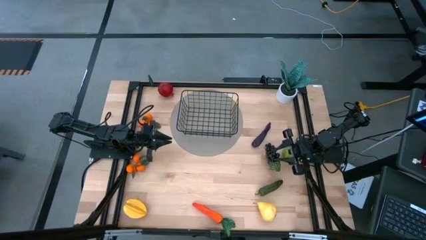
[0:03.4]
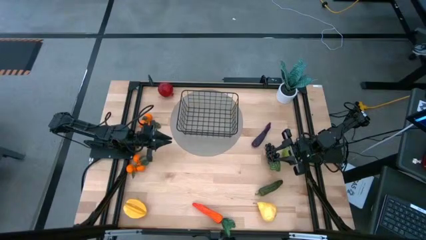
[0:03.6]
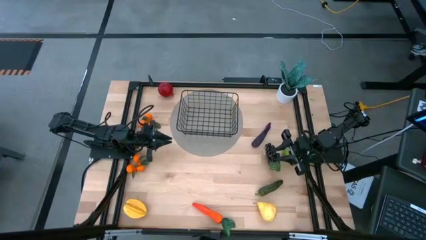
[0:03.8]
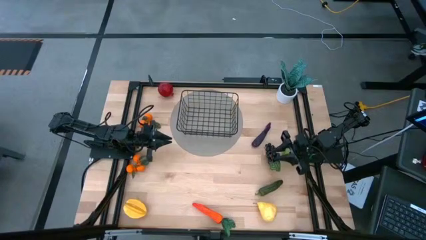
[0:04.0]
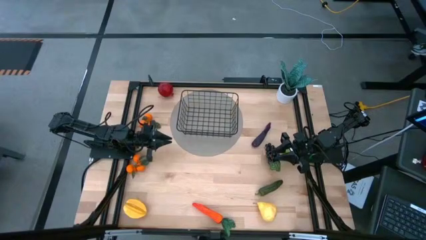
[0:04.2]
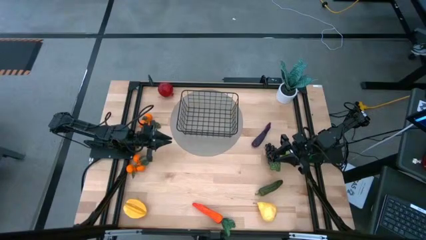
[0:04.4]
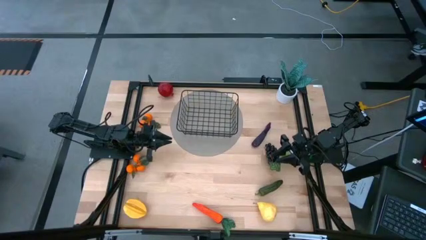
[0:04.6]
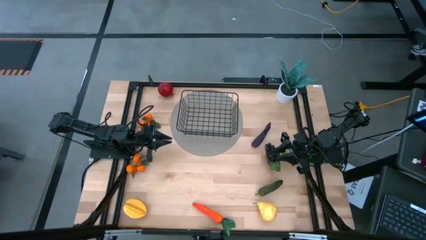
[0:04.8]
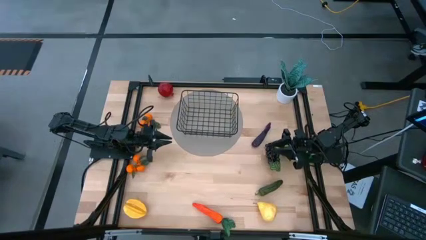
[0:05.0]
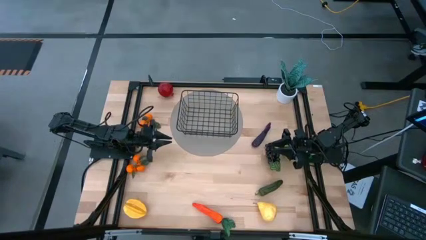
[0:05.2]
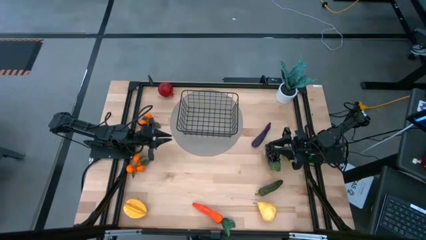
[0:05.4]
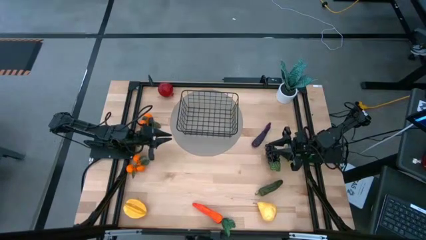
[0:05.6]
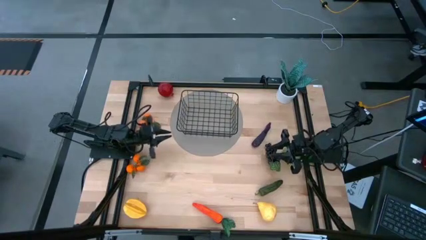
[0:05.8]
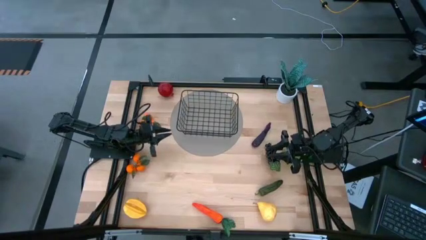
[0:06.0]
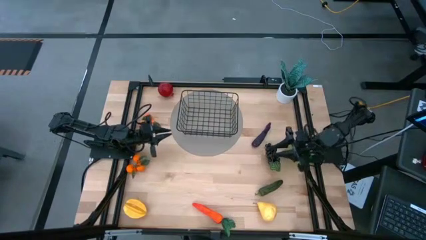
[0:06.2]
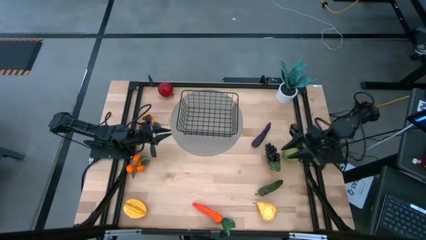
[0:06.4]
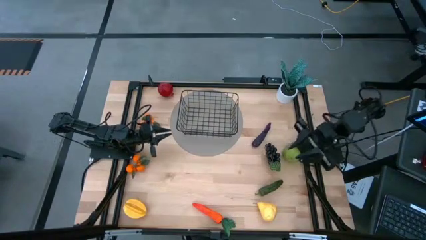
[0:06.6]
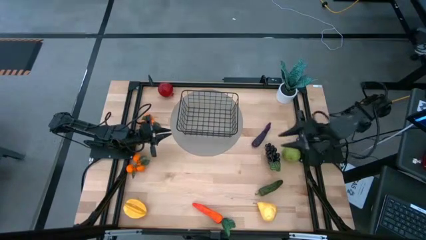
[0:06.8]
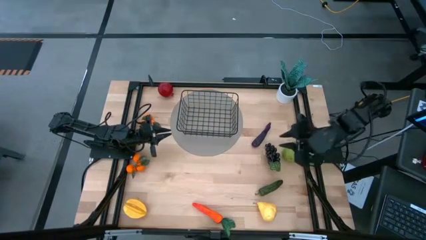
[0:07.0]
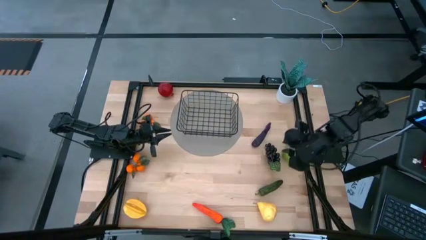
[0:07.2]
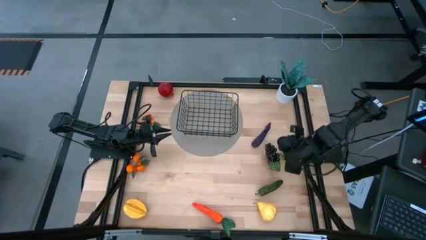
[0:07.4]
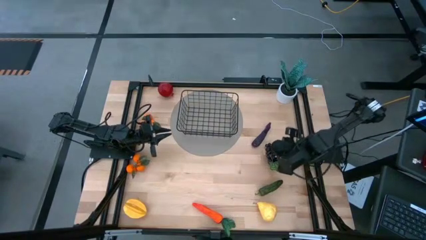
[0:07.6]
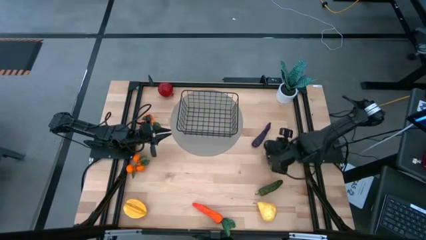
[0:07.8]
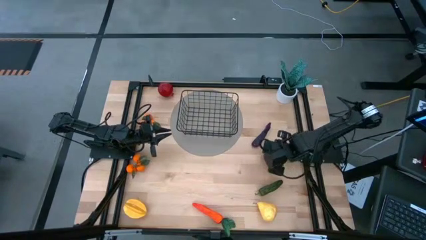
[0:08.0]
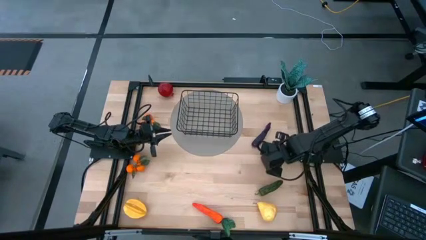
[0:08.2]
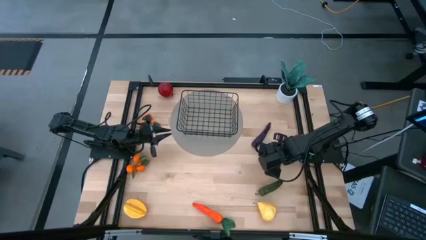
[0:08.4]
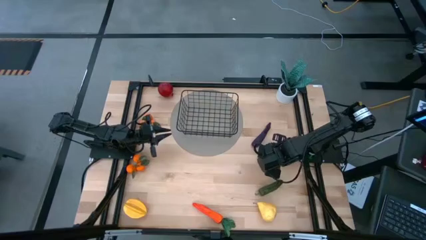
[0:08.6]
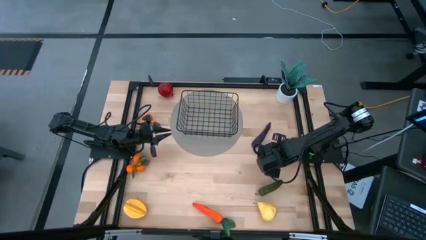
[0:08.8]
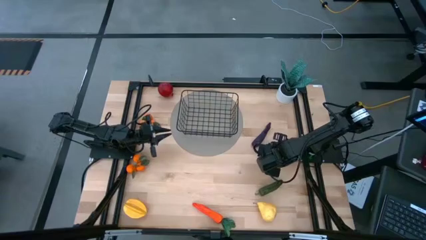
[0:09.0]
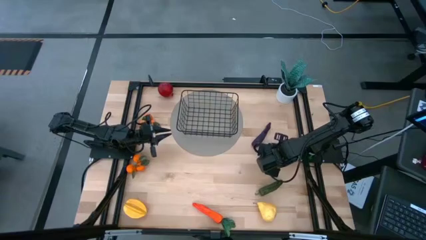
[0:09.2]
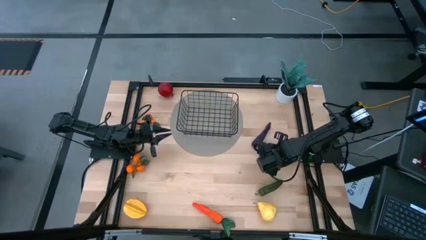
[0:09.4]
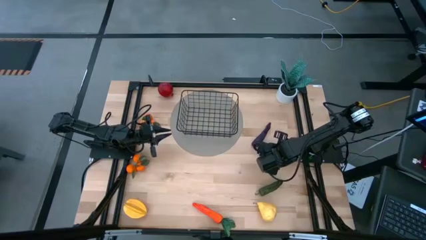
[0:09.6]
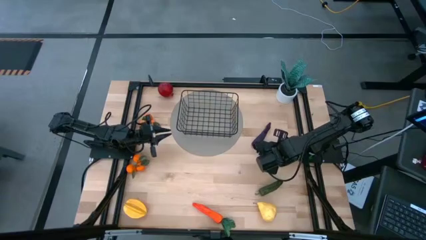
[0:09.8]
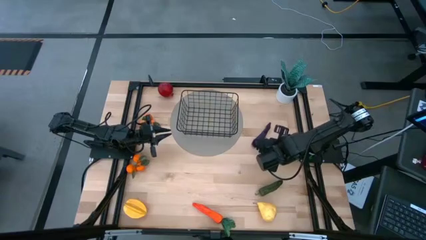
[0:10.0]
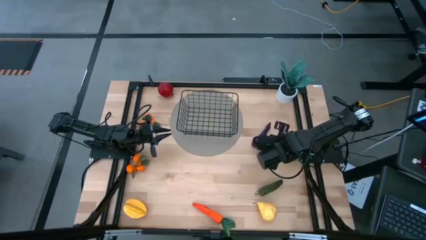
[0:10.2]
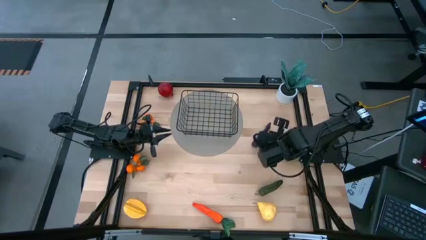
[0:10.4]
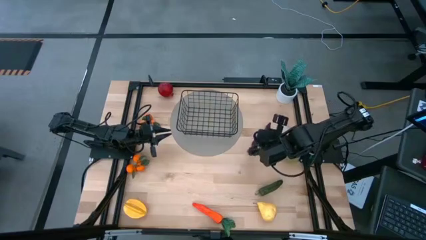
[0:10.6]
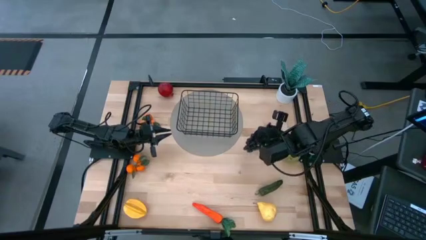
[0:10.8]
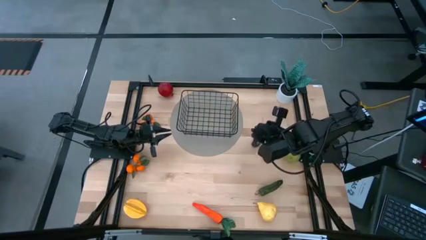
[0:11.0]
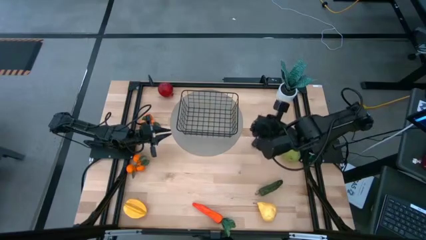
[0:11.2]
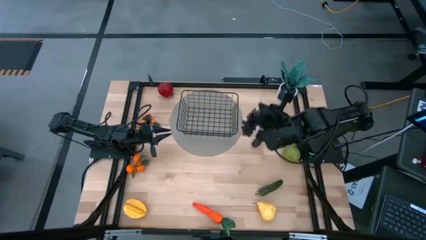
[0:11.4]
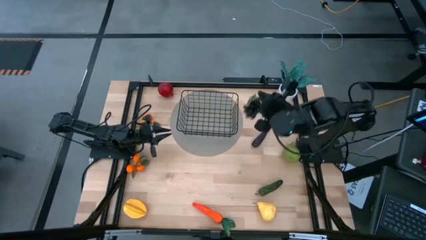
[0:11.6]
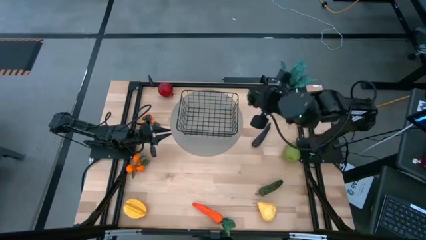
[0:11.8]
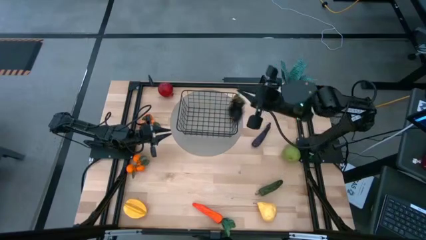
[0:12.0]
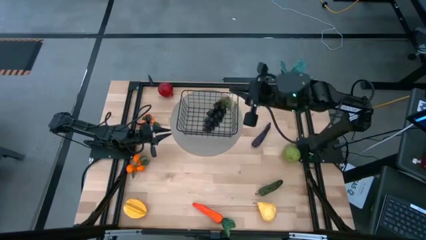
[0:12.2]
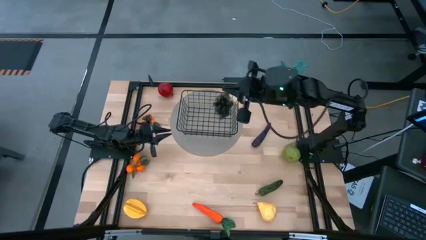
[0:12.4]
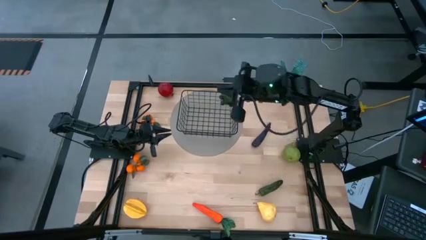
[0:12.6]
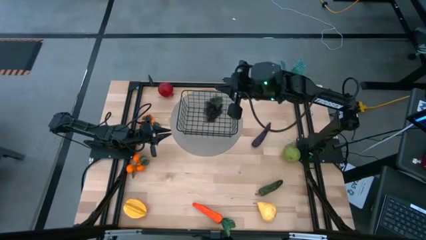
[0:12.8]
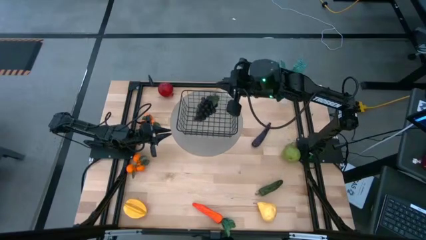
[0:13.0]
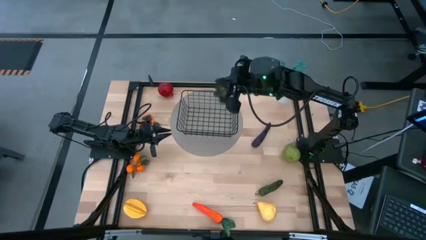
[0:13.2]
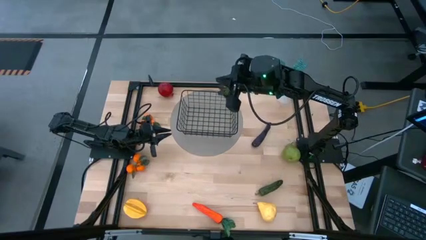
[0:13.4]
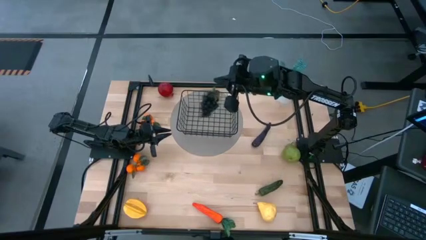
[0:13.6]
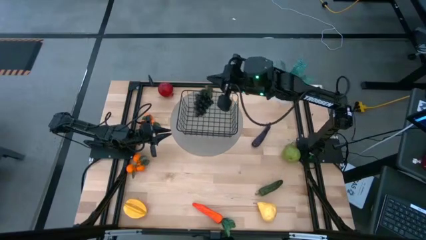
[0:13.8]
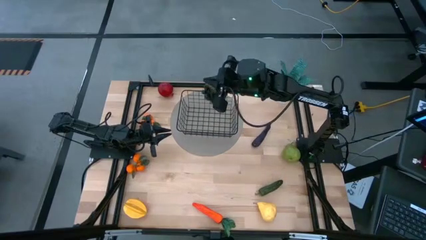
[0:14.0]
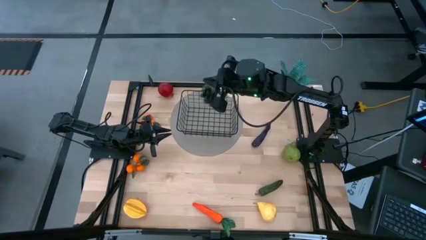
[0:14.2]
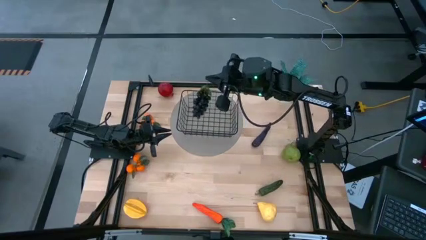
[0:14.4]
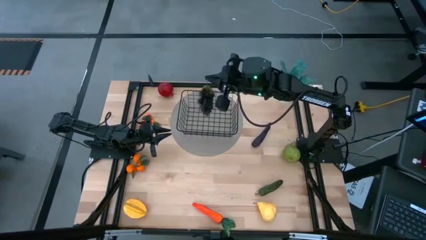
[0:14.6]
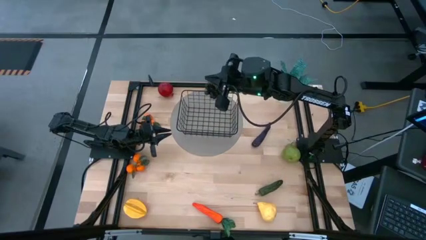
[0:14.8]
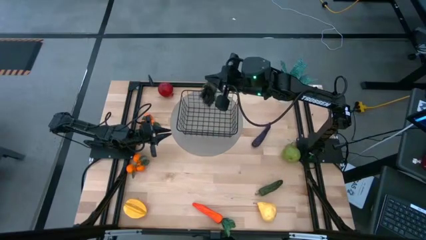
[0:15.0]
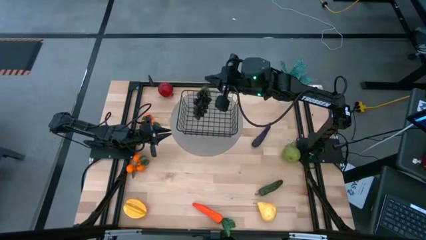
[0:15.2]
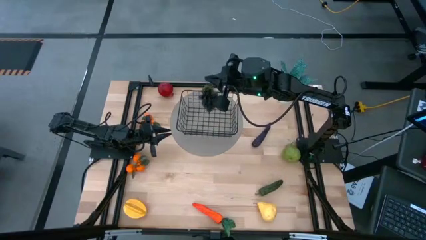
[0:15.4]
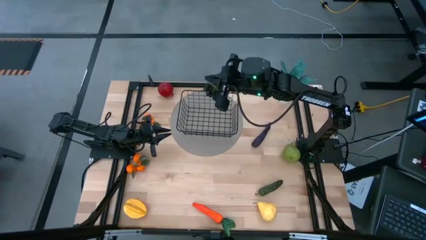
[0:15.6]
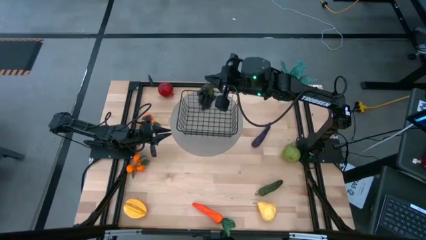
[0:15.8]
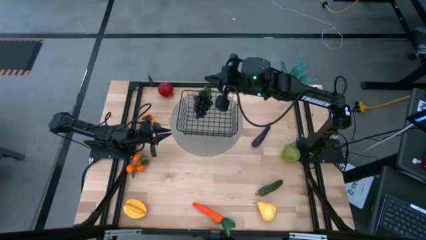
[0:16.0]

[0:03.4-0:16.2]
Task: Build produce basket
Put the black grapes into the black wire basket
